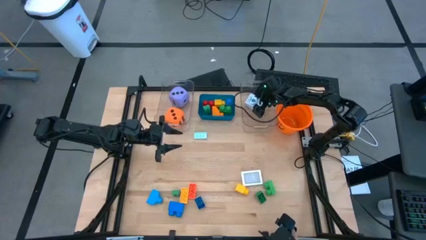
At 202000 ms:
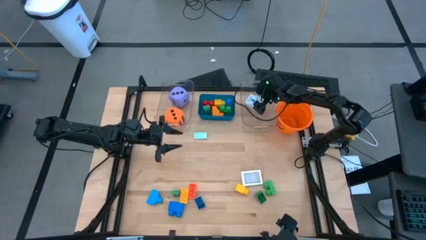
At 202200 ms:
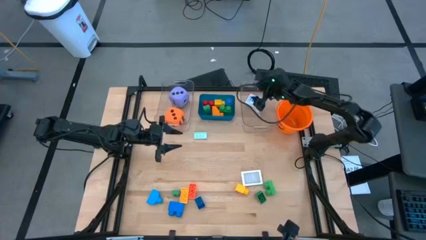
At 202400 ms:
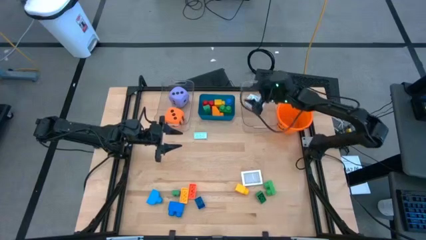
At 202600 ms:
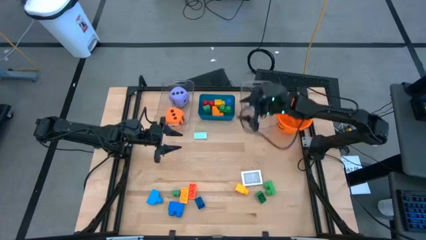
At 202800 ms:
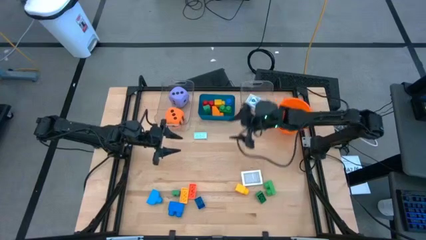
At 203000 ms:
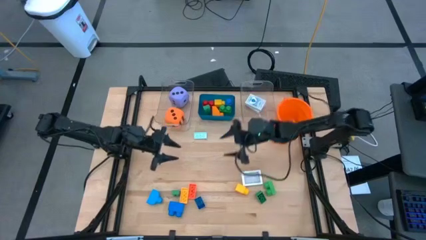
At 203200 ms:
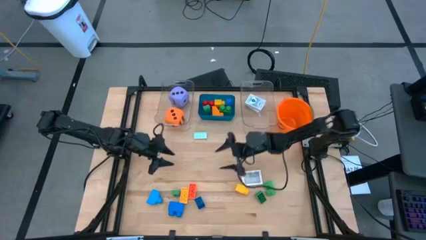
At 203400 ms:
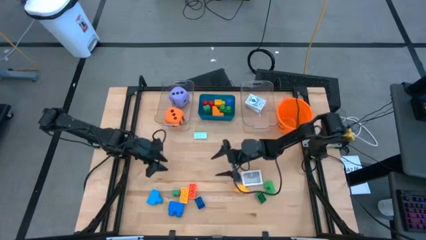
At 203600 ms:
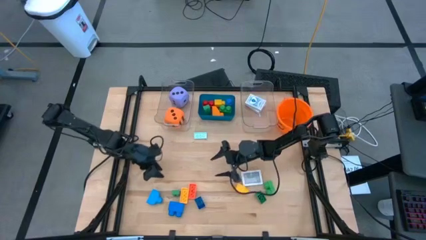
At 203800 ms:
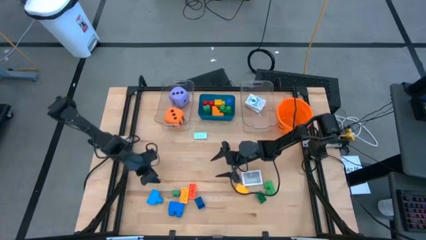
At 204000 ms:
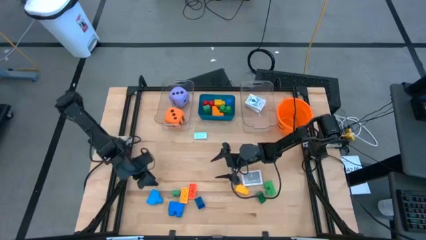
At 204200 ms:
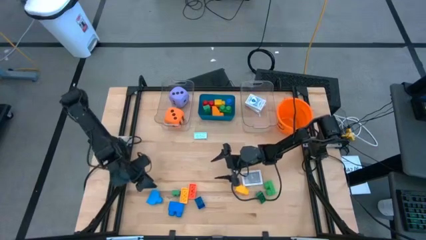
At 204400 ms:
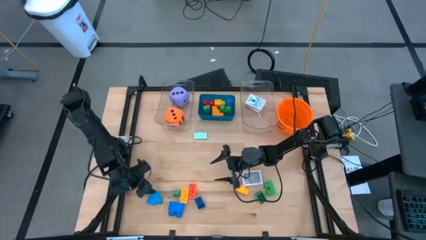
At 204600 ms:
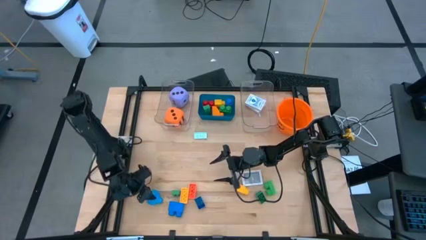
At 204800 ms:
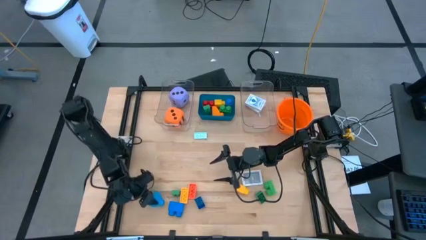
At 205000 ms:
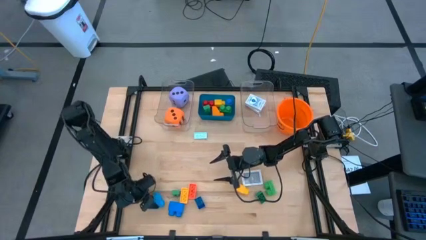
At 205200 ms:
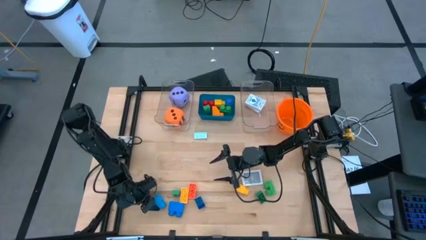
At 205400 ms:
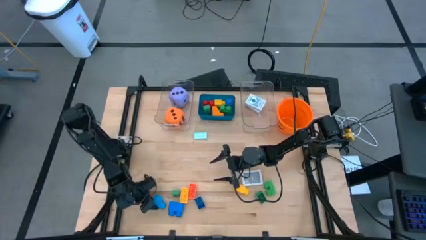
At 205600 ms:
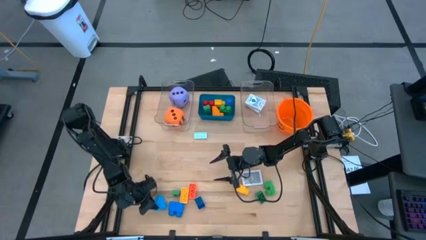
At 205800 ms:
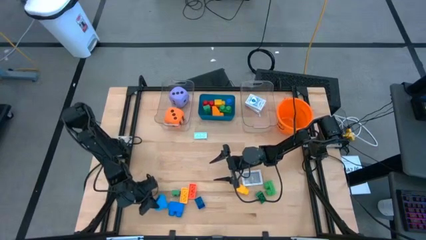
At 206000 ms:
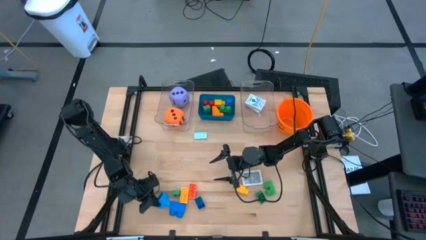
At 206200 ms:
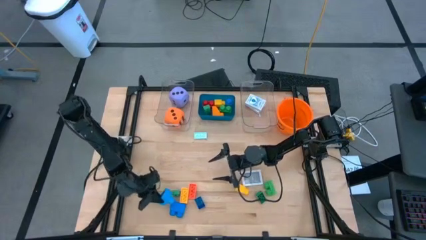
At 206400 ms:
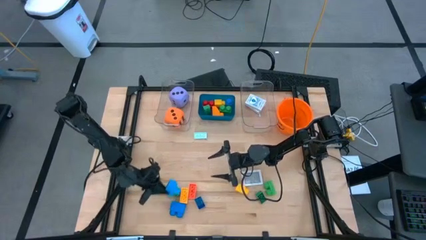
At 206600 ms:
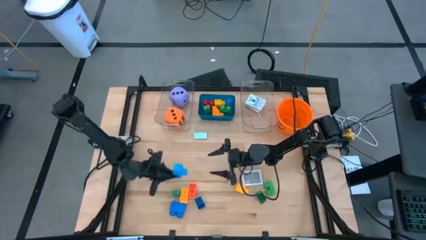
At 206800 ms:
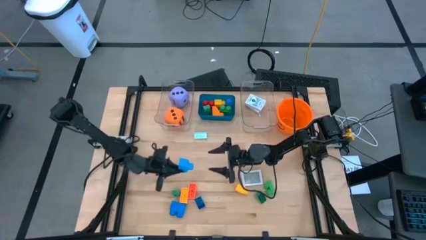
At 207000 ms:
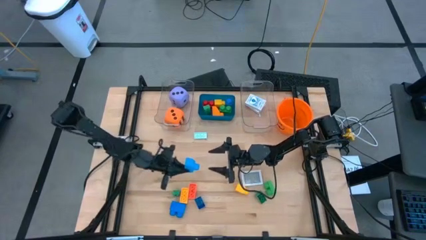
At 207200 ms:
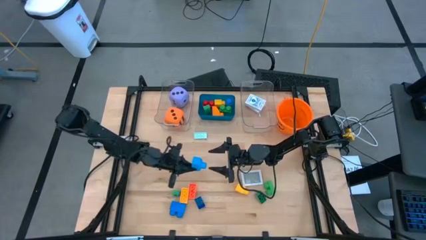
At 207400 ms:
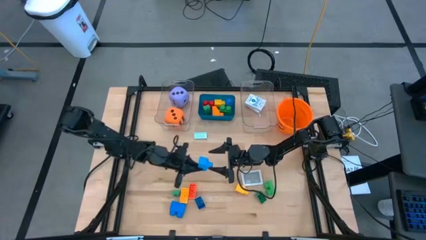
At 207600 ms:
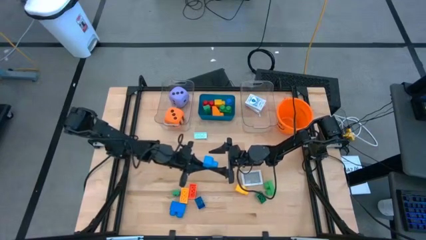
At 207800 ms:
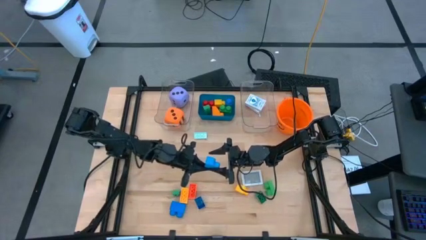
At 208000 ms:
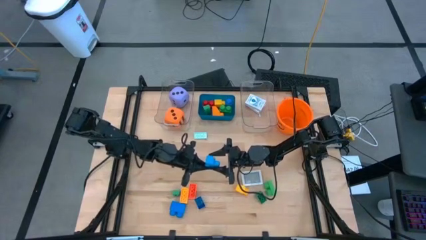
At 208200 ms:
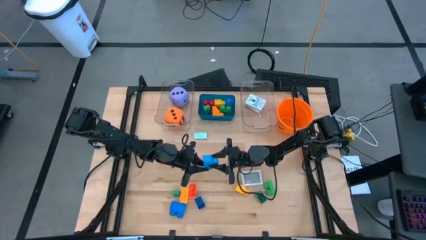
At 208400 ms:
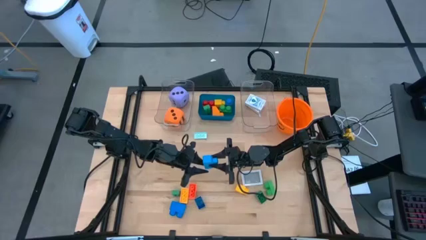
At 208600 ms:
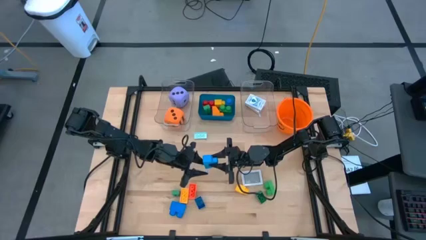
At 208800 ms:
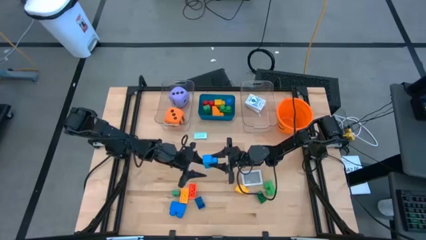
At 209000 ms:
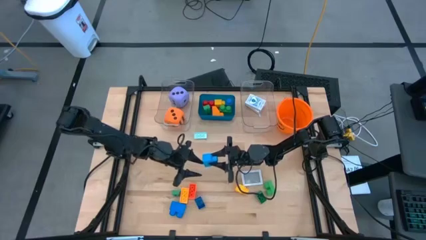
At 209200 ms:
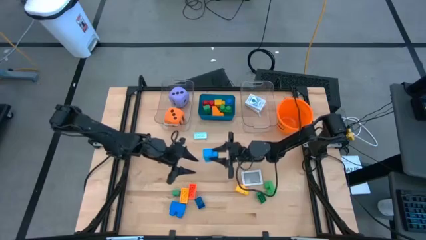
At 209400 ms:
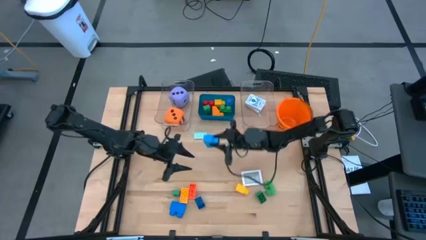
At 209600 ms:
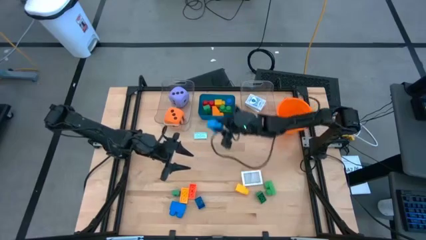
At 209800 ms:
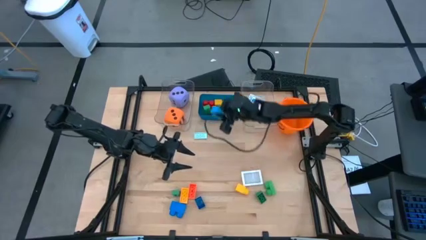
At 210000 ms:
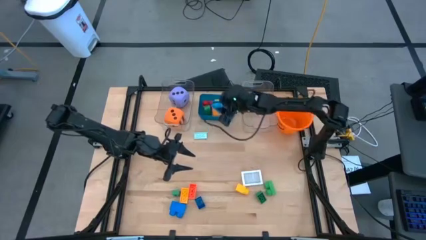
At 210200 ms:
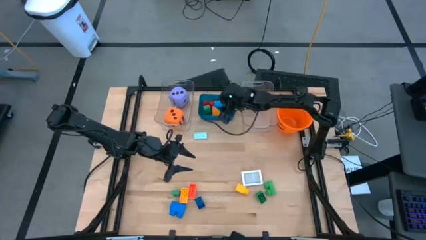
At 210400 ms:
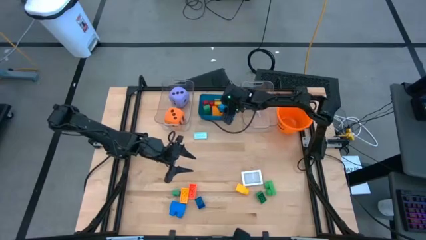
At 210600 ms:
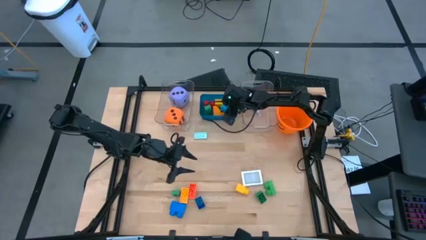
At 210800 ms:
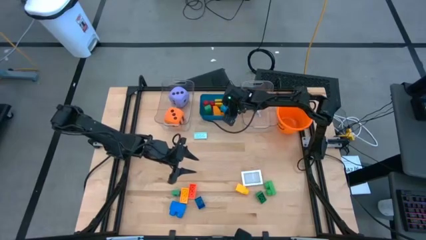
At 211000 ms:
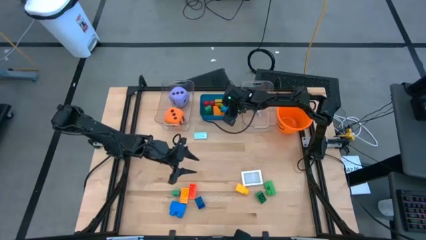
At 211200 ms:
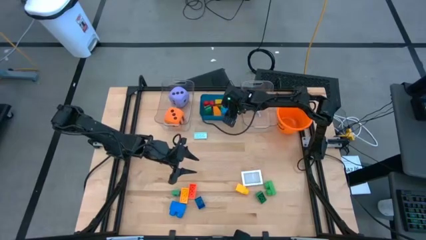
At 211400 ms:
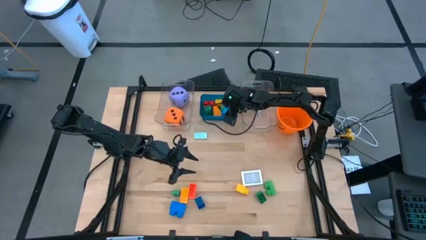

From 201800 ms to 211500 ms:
Task: Pick & Place Toys
Put the blue game piece into the blue bin

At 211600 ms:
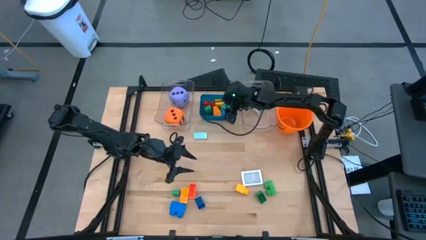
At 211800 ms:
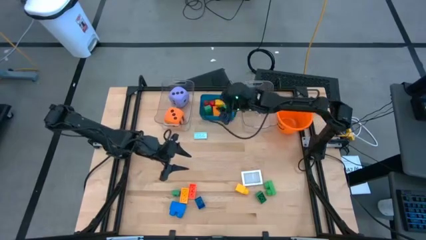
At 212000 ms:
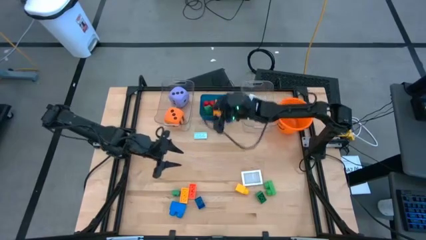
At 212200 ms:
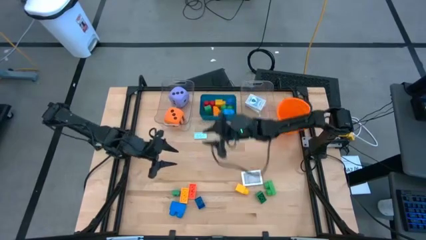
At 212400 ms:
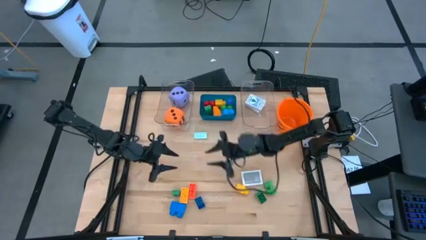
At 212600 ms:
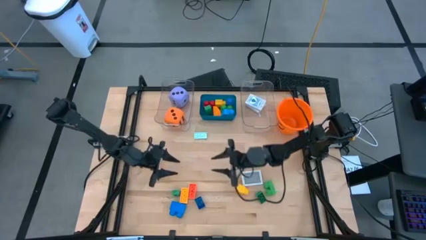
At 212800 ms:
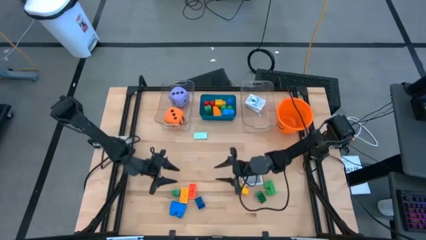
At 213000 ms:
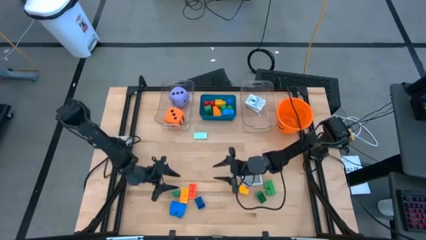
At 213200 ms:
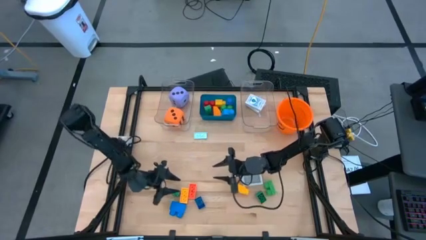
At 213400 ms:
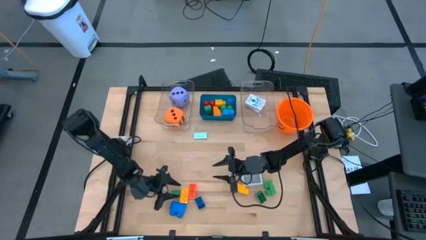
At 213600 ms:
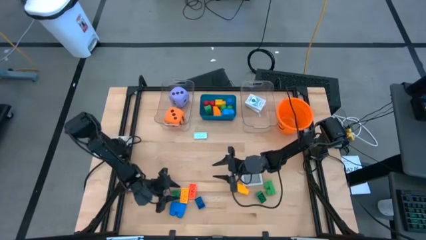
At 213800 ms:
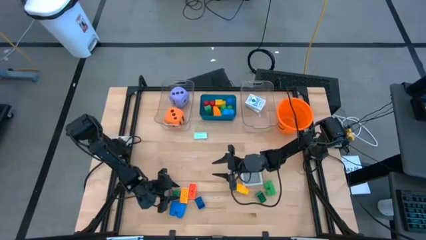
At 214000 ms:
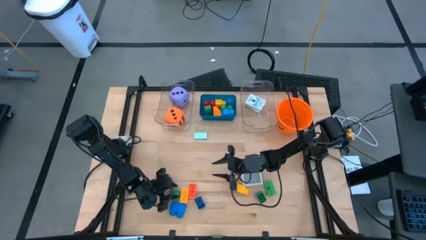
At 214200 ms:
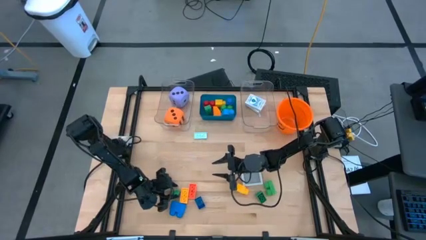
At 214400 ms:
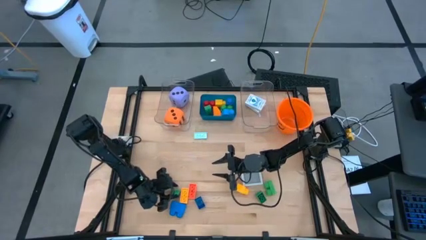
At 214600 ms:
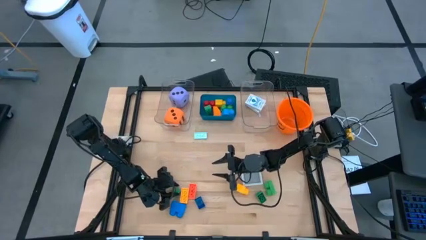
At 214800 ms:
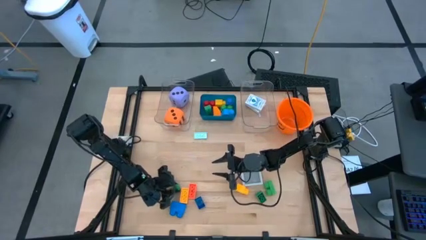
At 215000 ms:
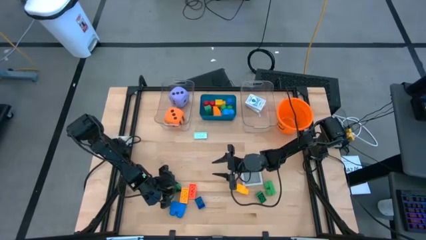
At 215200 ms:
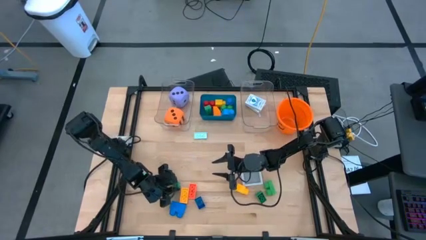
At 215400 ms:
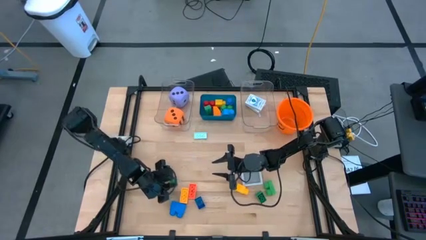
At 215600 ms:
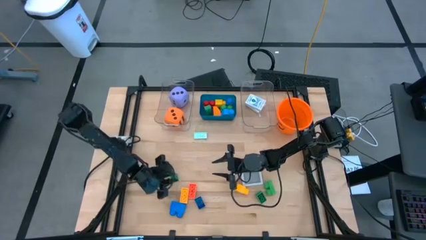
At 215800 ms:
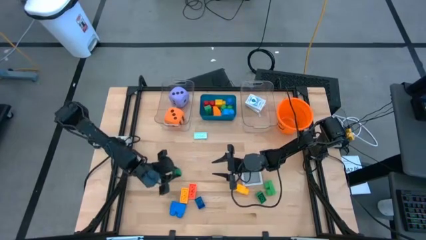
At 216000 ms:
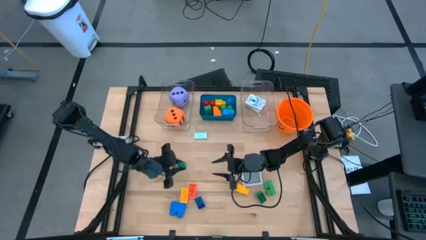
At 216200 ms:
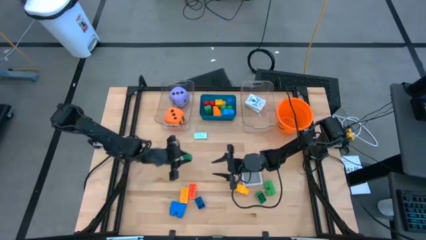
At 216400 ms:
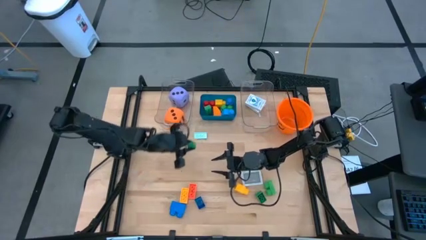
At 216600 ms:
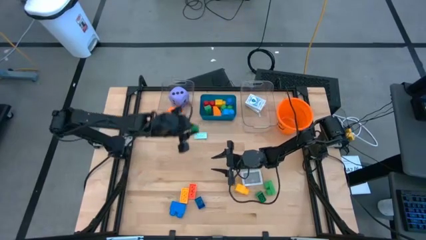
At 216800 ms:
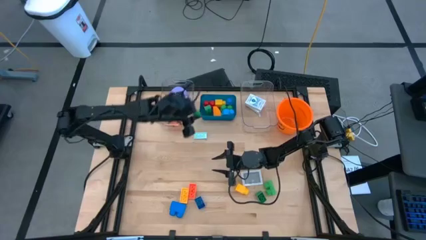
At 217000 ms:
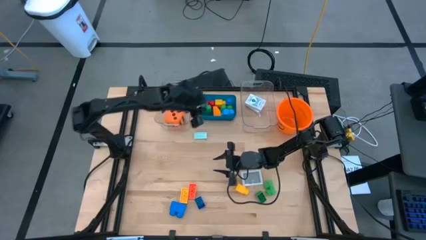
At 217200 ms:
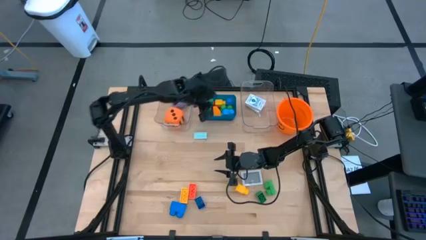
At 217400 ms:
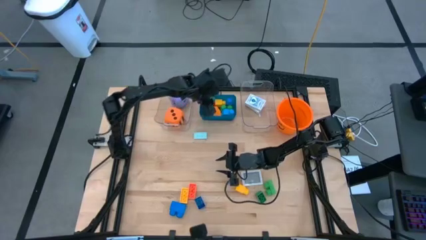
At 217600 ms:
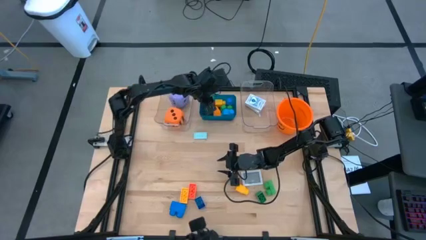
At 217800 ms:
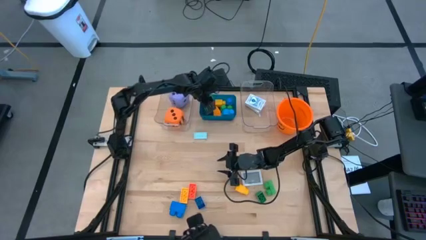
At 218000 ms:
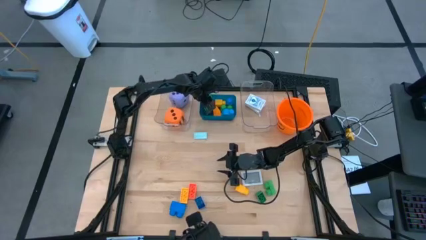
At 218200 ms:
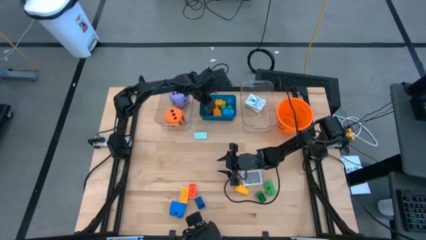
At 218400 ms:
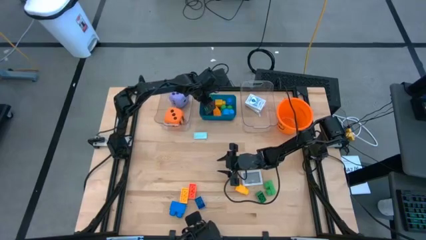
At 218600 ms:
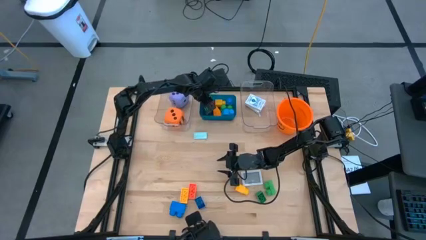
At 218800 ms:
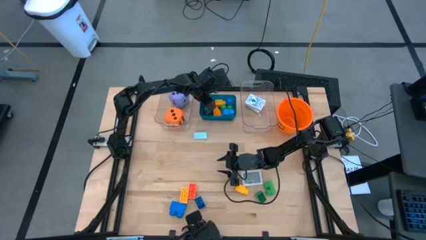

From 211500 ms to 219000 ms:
Put the green game piece into the blue bin
